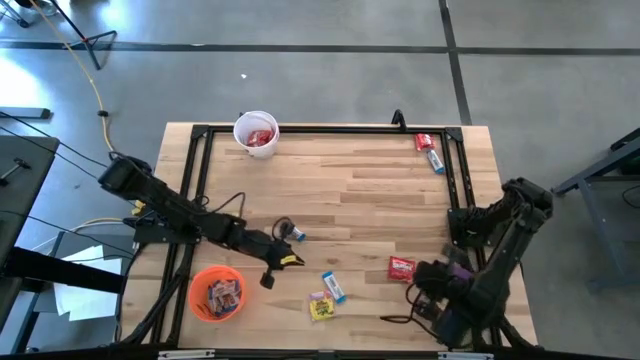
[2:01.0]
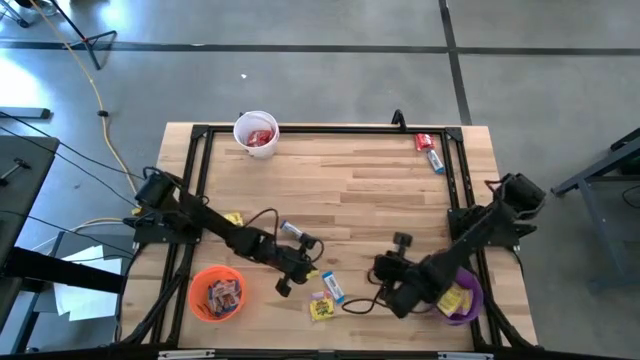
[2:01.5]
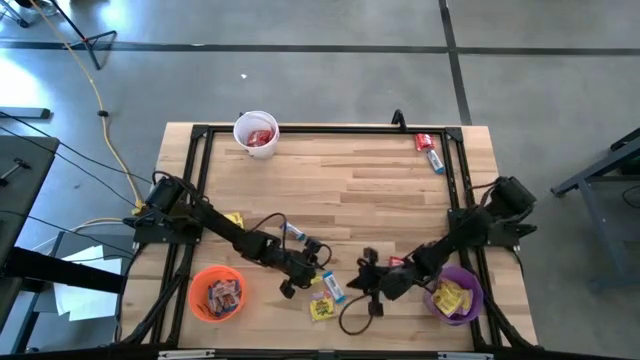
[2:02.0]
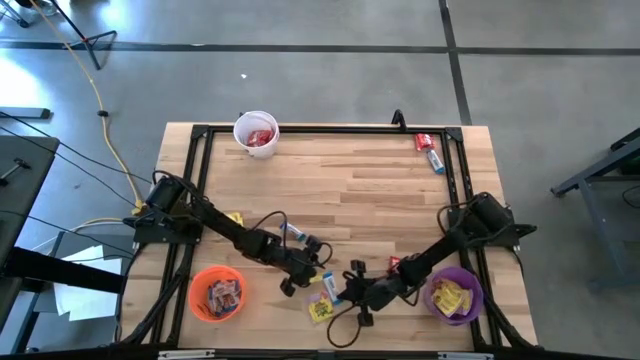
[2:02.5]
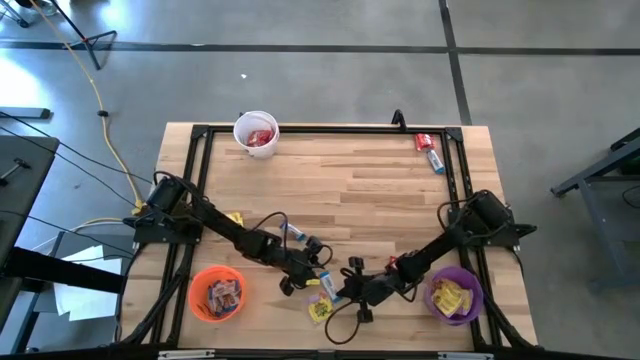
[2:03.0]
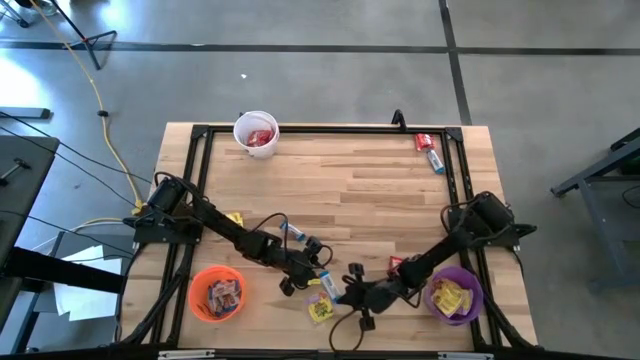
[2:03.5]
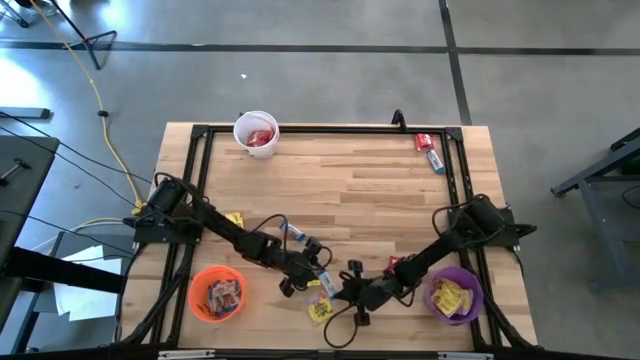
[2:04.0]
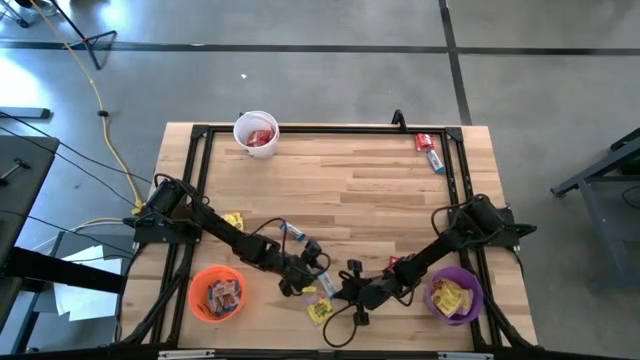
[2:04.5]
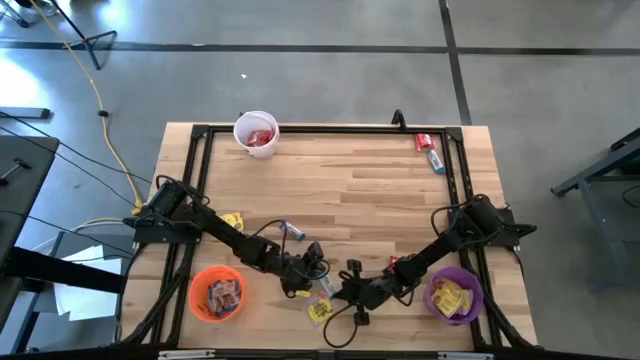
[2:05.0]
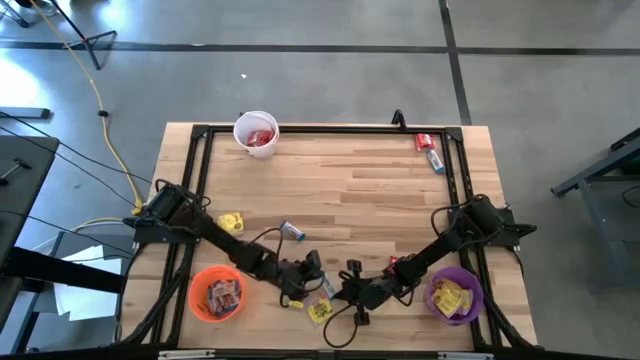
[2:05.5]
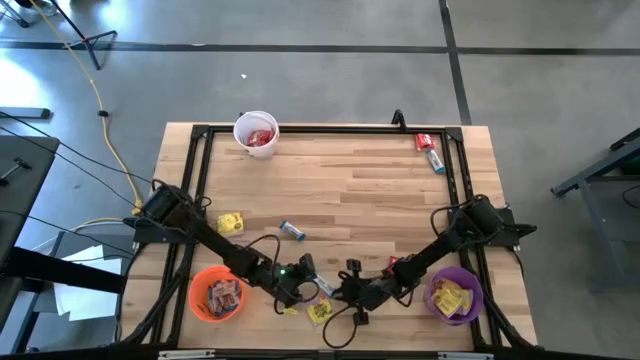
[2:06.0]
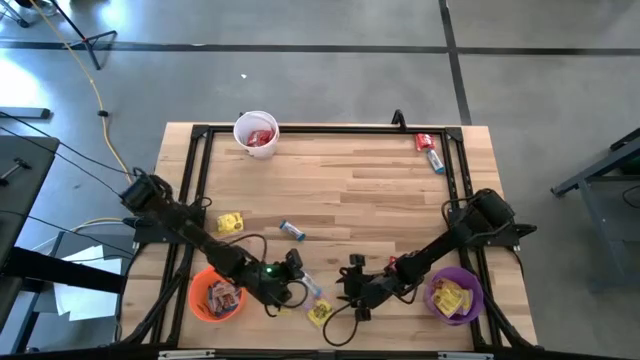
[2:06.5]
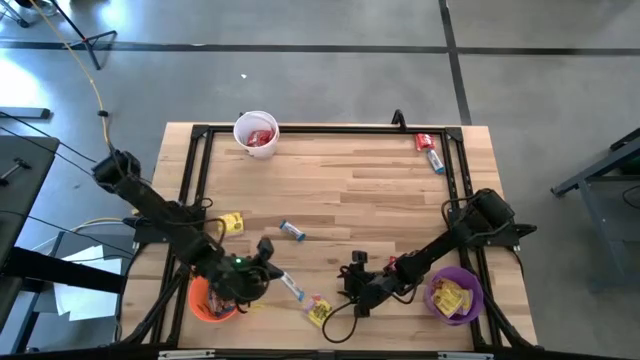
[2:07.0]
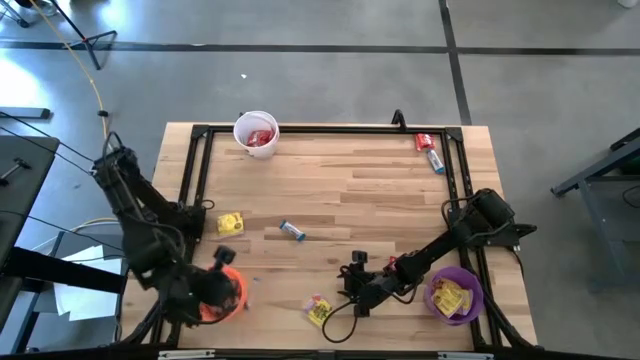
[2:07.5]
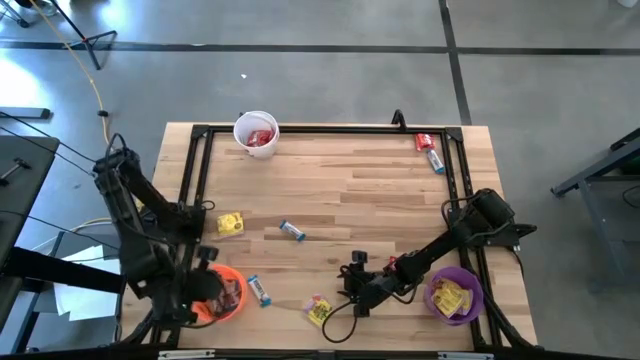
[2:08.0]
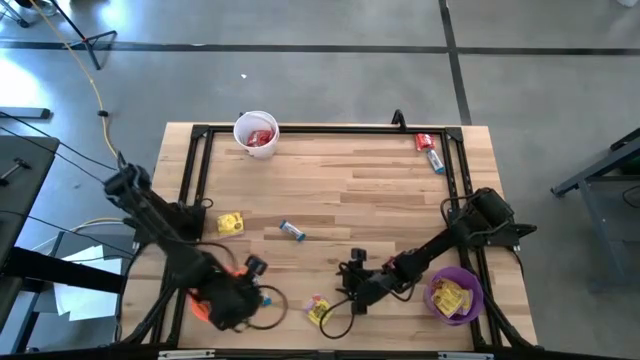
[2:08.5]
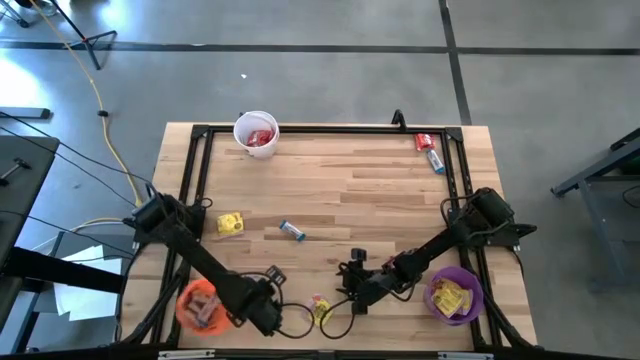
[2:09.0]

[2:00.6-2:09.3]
Task: Sort candy
Put the white candy into the orange bucket

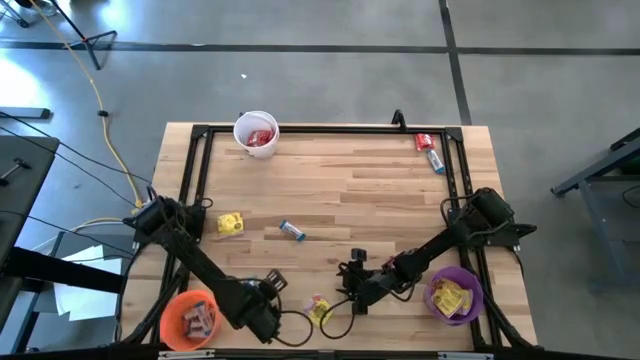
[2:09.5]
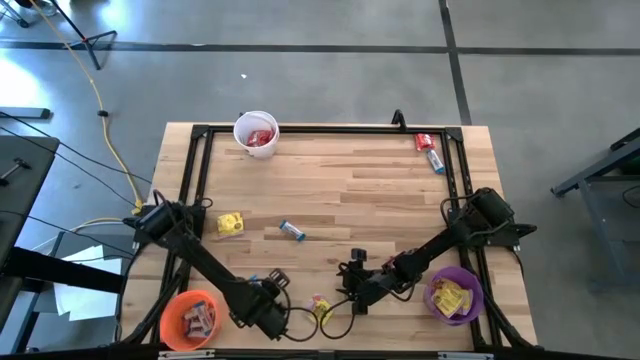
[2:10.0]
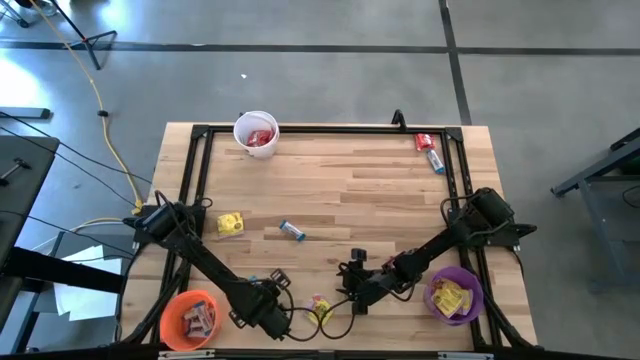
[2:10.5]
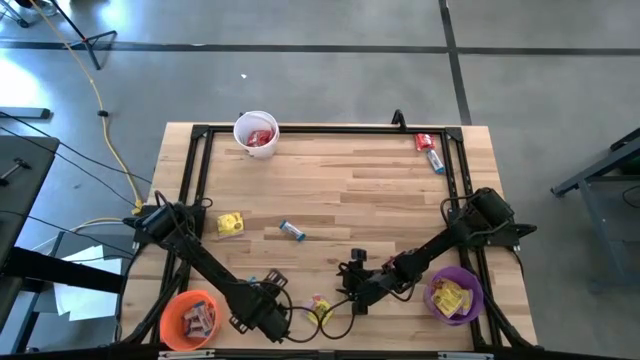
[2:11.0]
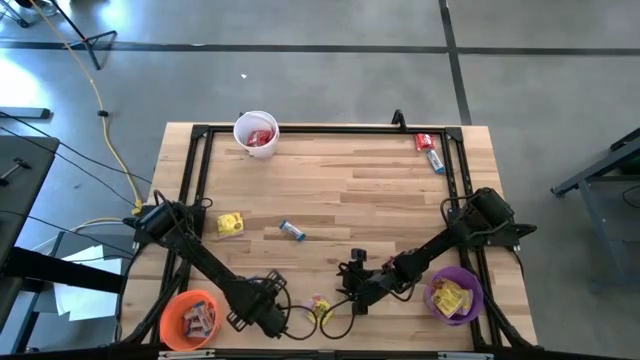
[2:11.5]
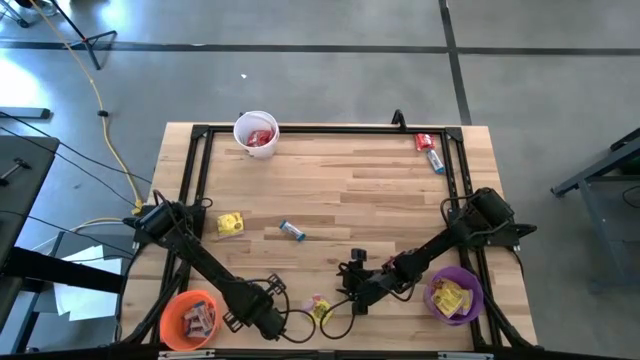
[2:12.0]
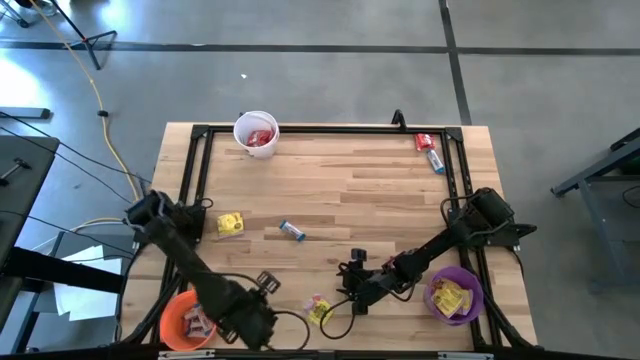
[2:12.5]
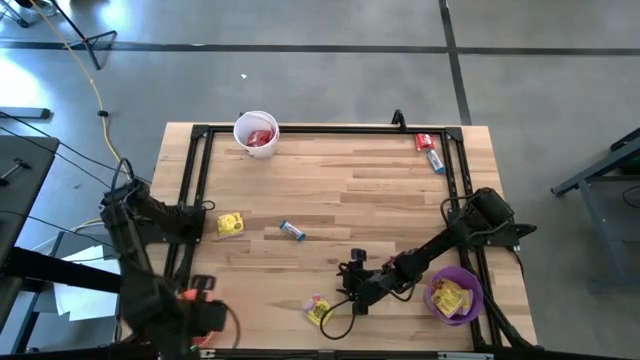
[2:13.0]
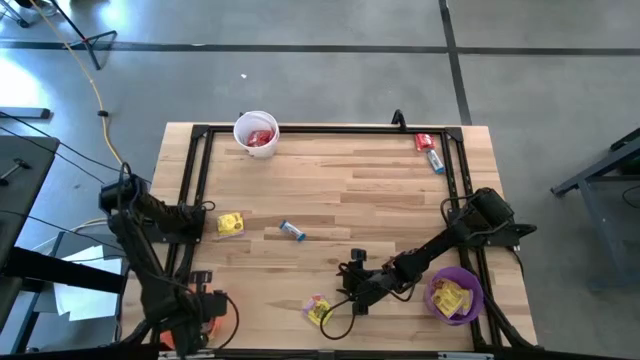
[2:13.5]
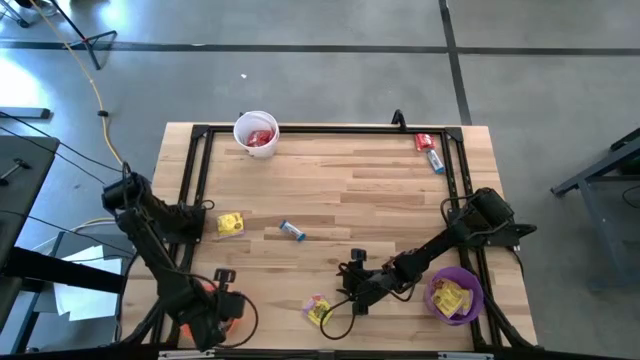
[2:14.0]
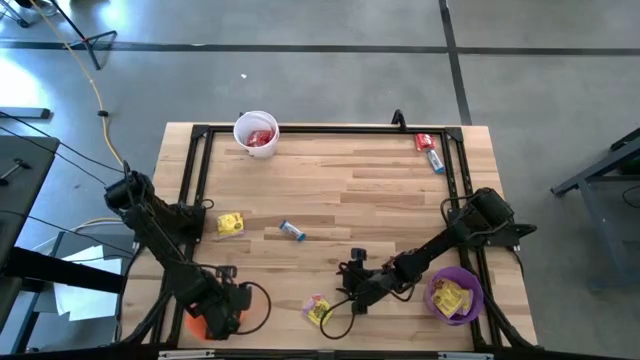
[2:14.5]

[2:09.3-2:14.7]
Put the white candy into the orange bucket

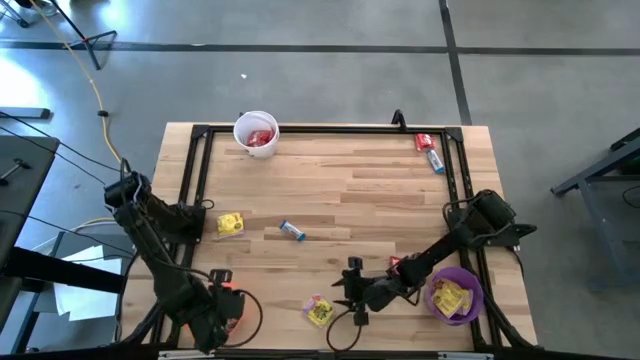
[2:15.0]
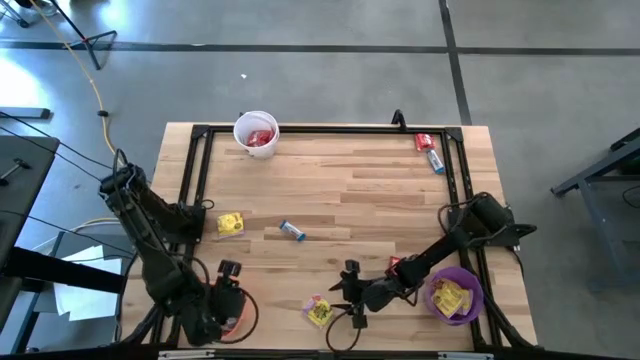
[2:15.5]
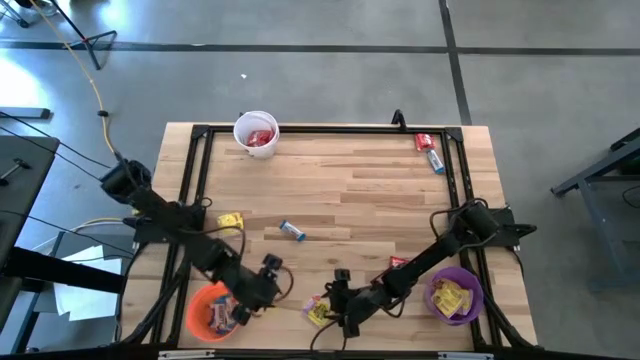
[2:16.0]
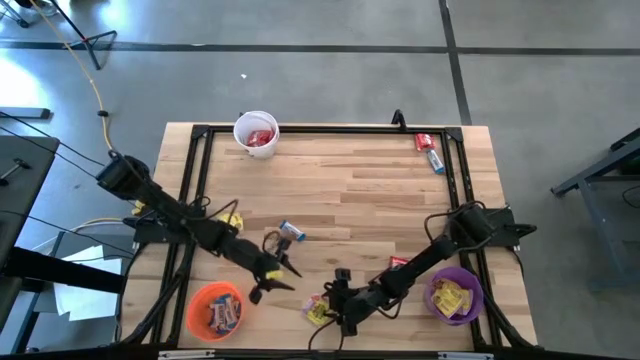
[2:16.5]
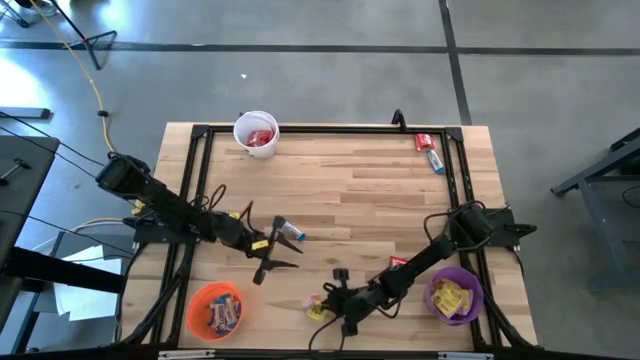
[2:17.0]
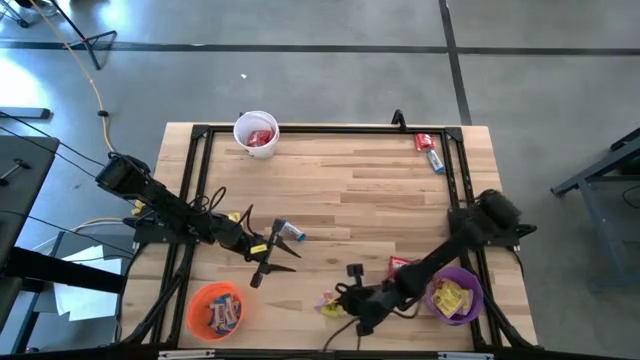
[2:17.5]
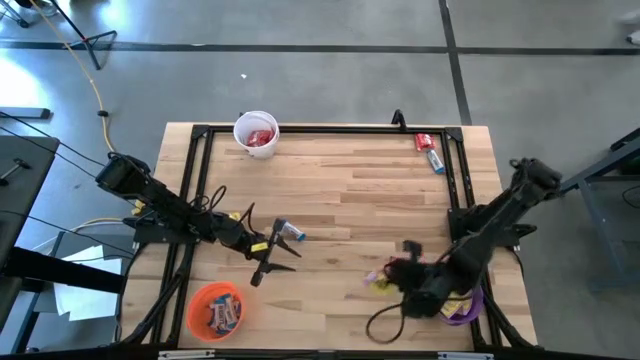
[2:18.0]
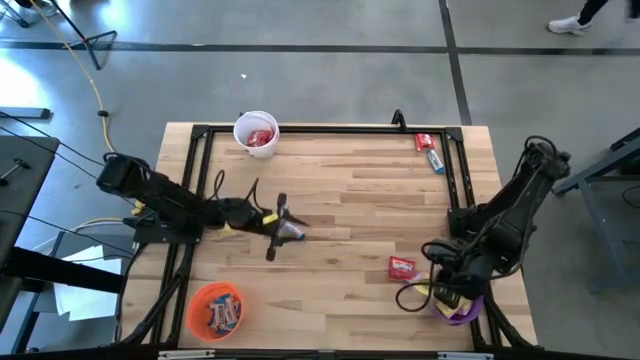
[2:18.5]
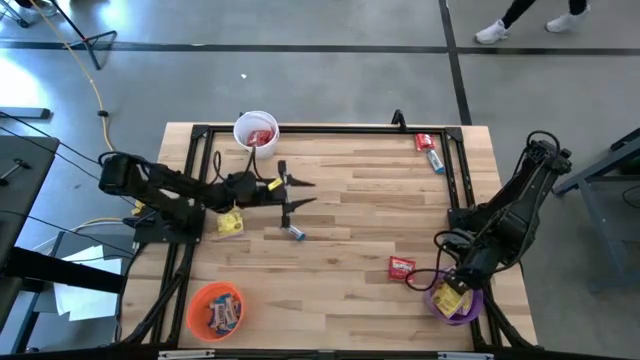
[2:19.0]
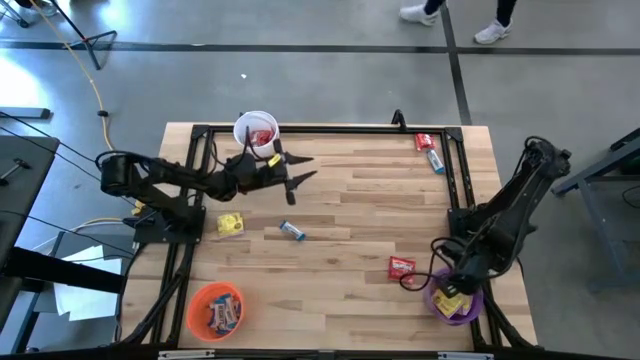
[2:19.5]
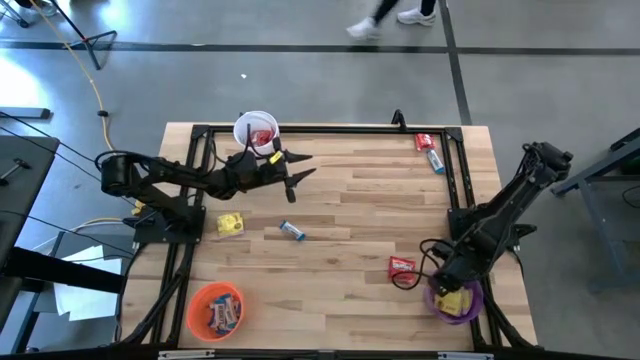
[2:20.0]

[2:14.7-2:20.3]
Put the yellow candy into the purple bucket

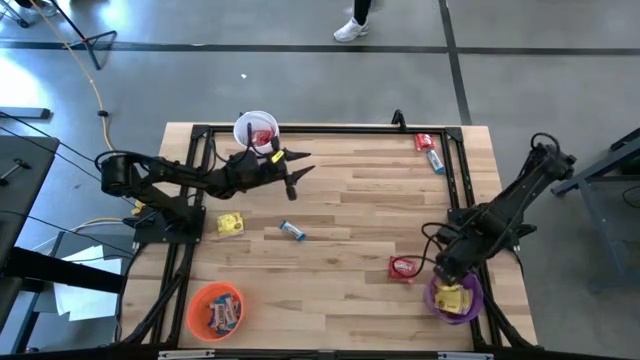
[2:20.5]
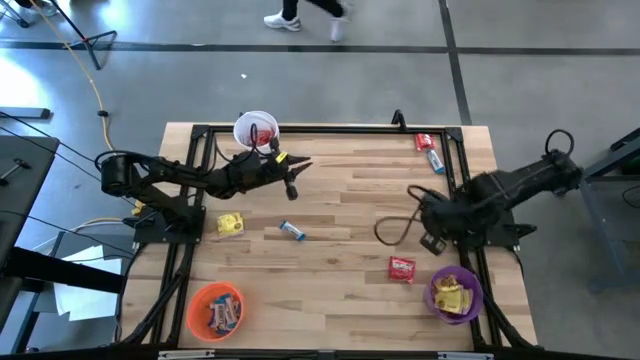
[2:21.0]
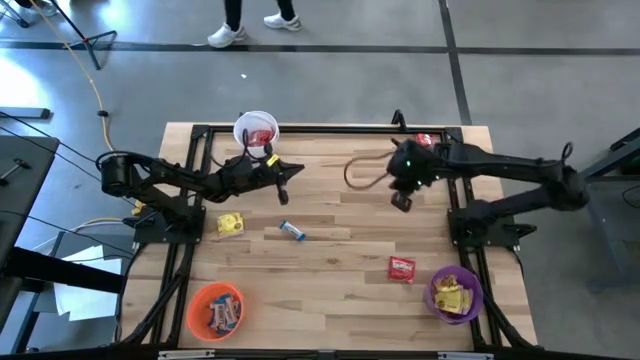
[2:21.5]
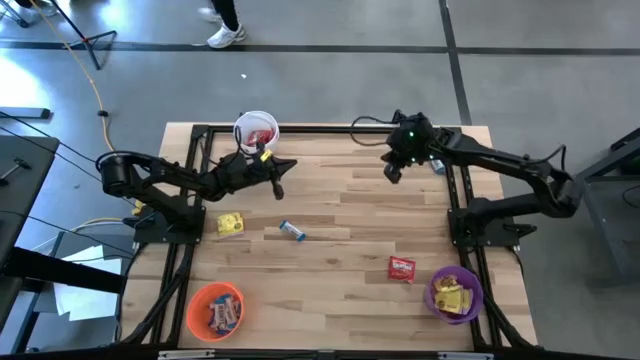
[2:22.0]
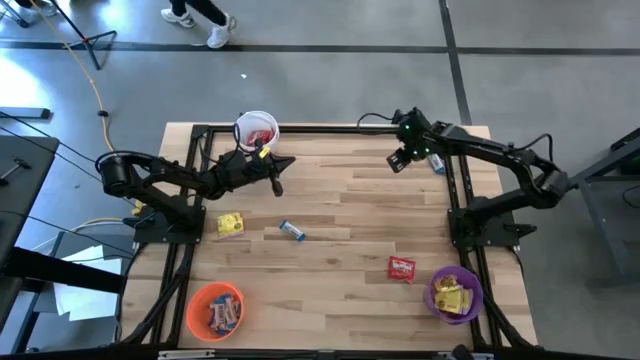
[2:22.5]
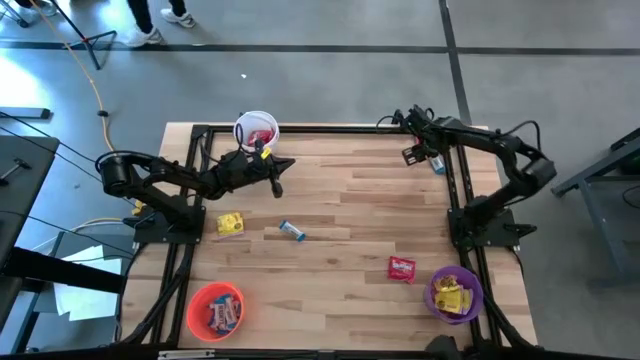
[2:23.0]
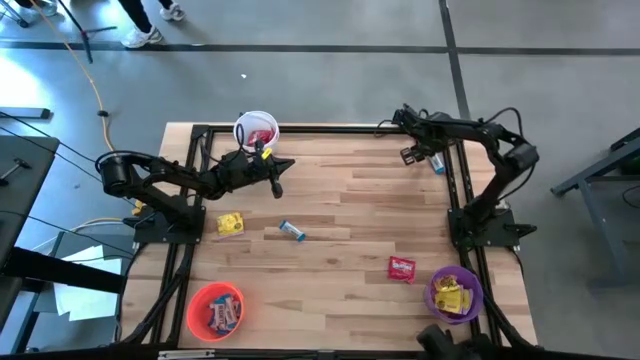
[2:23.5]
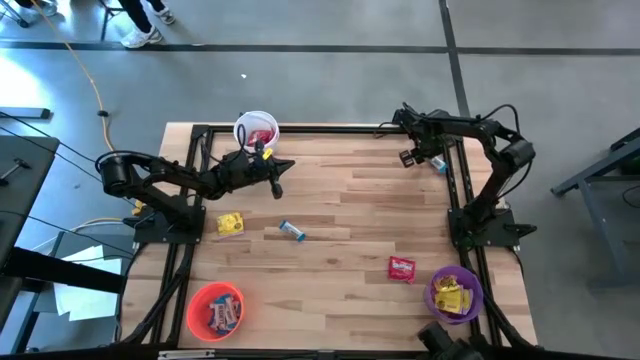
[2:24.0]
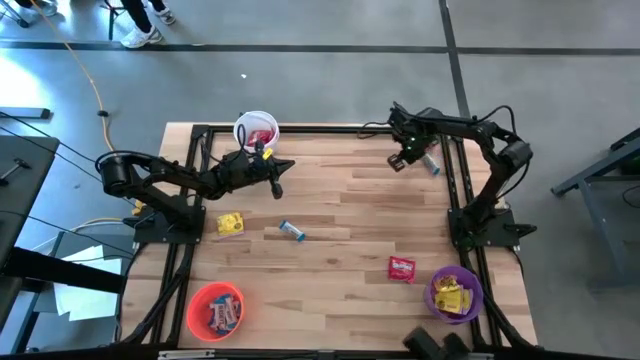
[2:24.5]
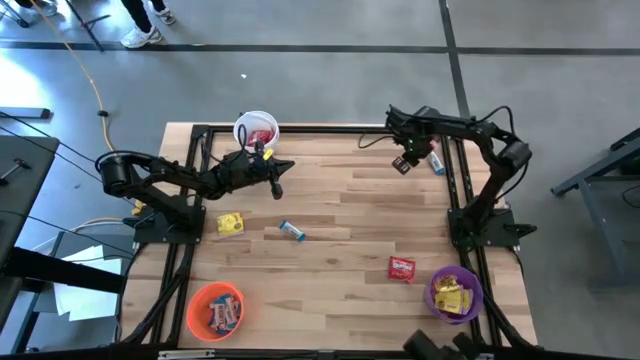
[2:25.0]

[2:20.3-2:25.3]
Put the white candy into the orange bucket
